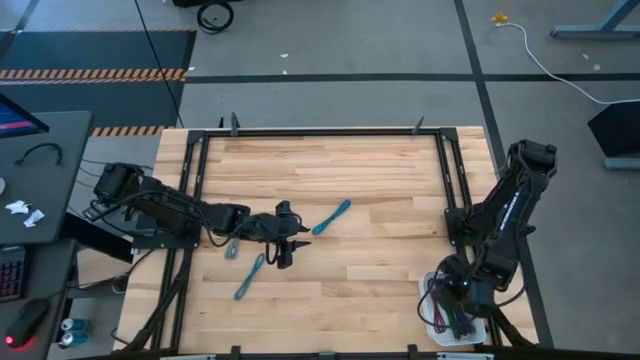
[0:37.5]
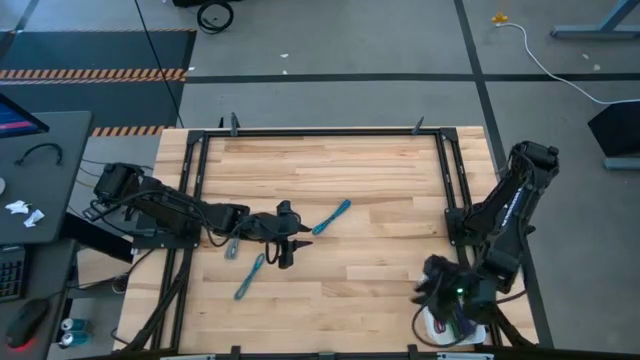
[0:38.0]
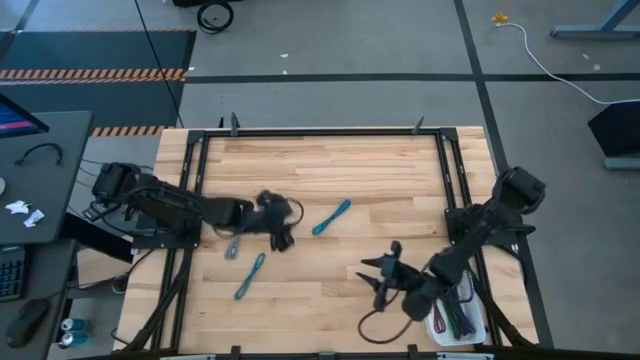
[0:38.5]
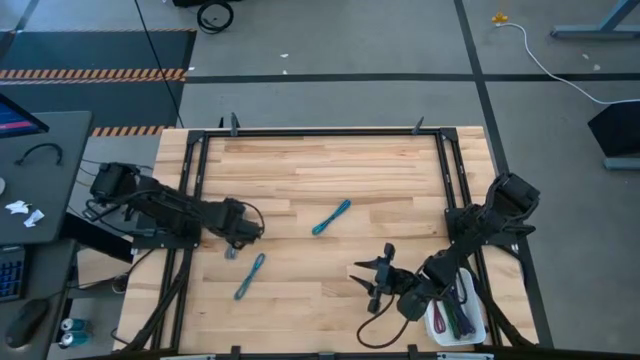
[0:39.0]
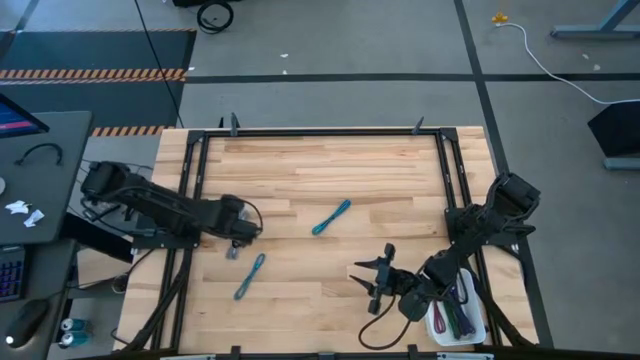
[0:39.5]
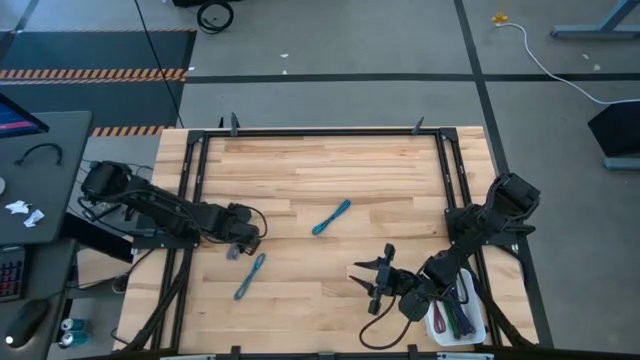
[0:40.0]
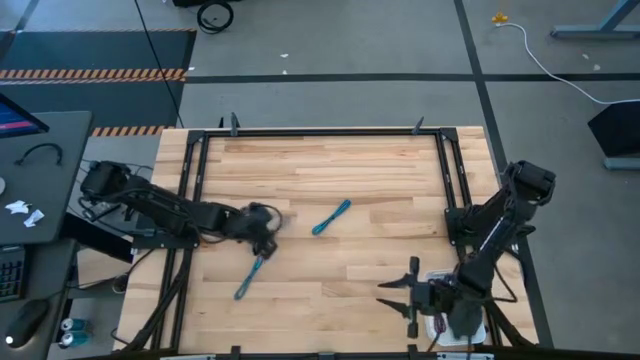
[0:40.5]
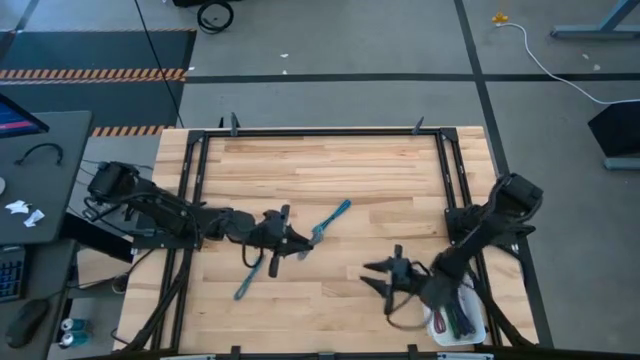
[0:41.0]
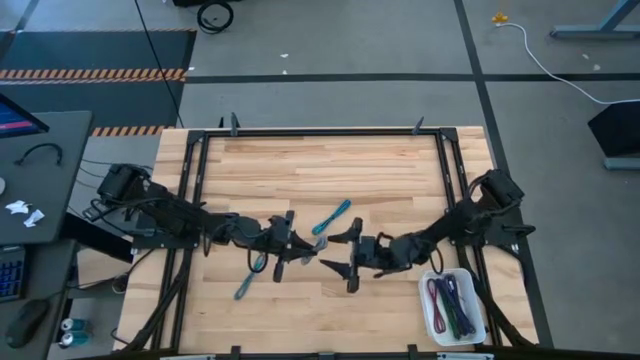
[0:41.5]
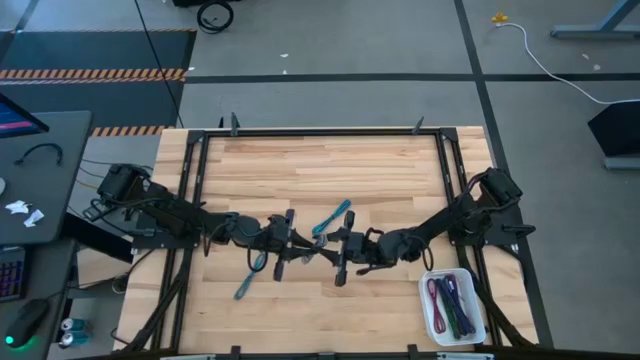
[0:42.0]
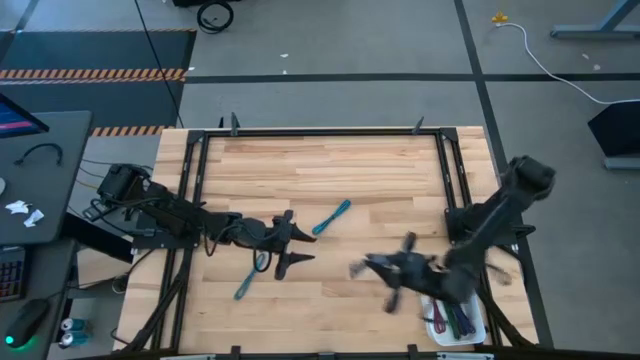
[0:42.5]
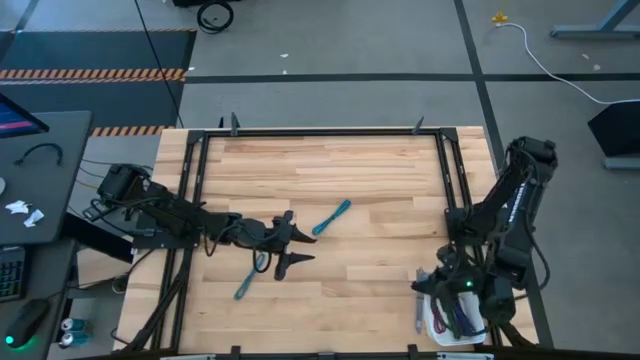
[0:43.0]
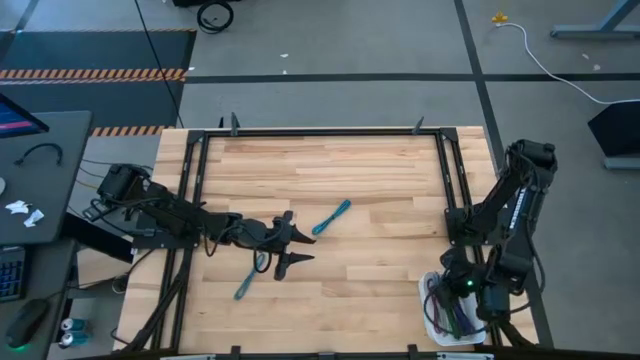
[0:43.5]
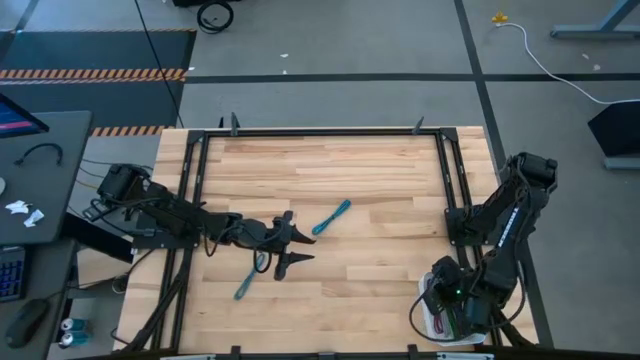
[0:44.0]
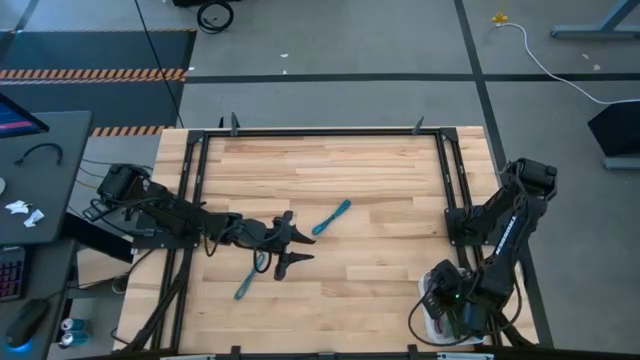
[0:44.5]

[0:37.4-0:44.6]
Task: Pick and place USB-C Cables
Put the white charger cable into the white bin

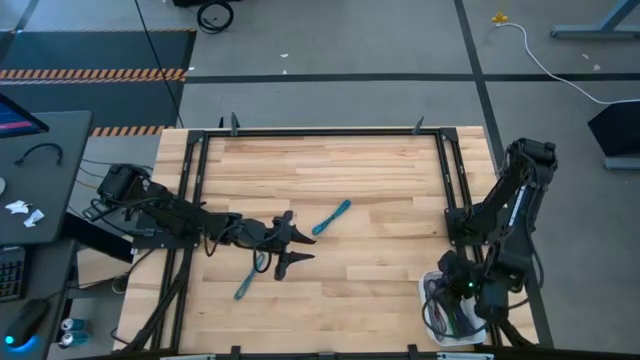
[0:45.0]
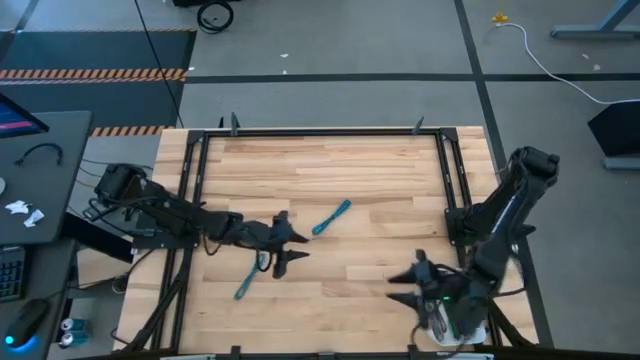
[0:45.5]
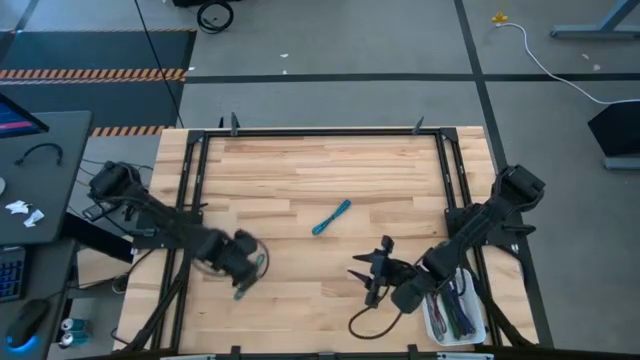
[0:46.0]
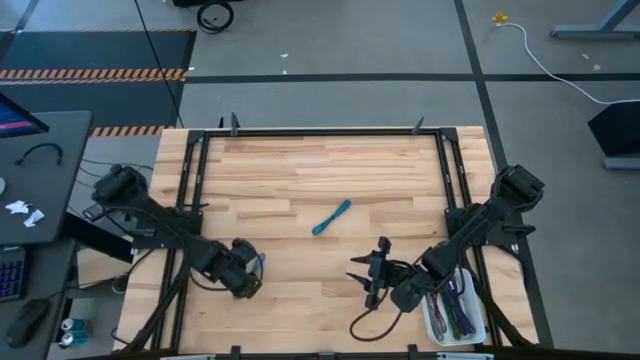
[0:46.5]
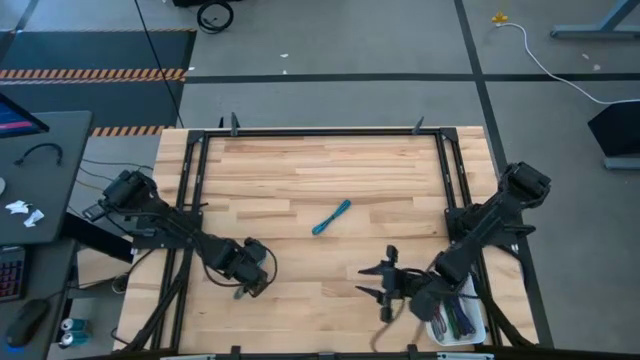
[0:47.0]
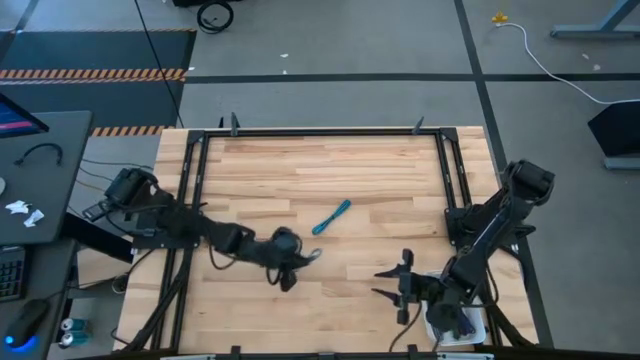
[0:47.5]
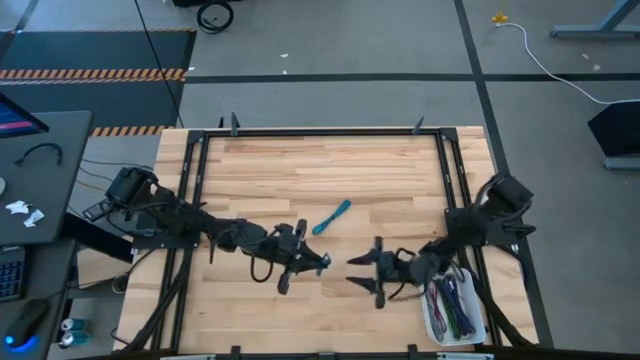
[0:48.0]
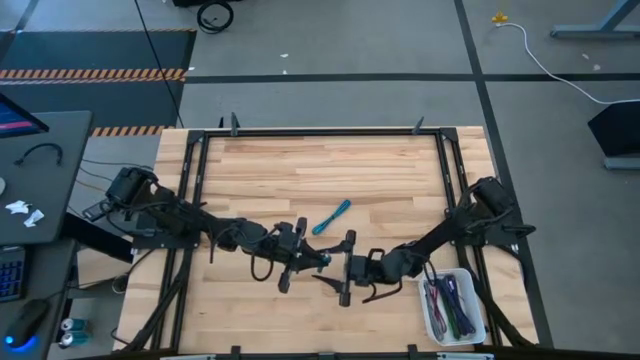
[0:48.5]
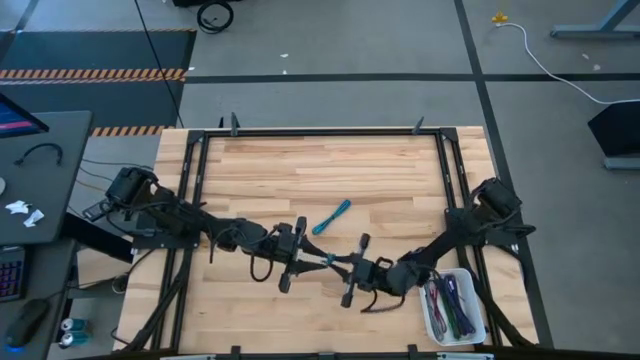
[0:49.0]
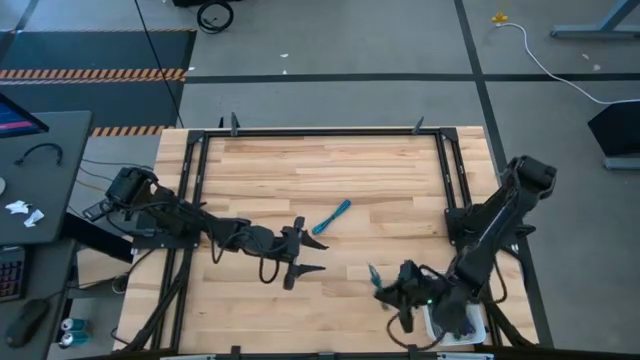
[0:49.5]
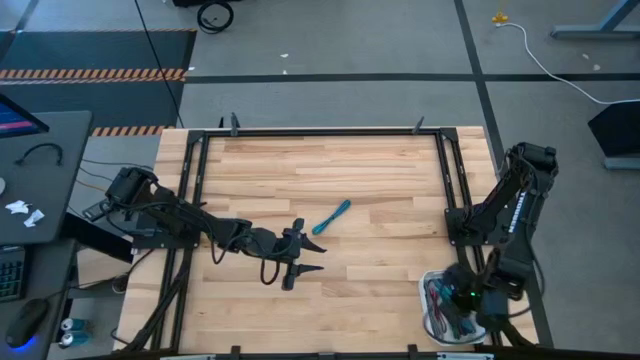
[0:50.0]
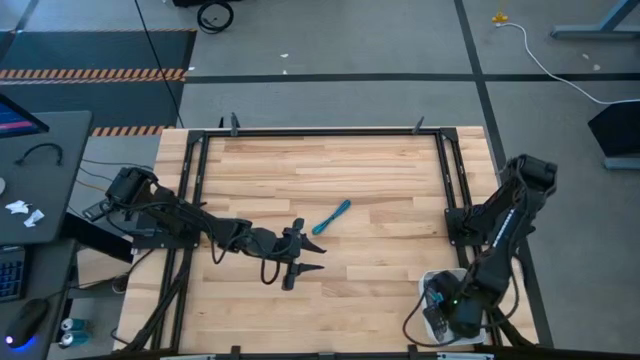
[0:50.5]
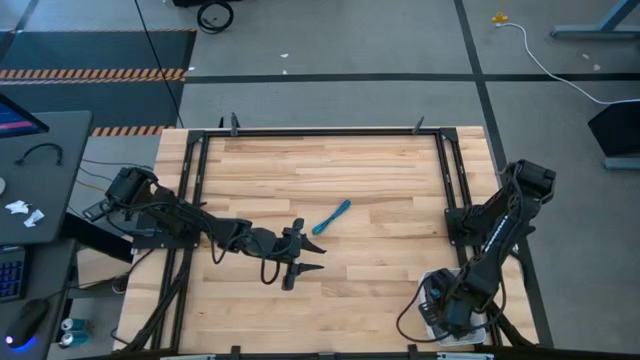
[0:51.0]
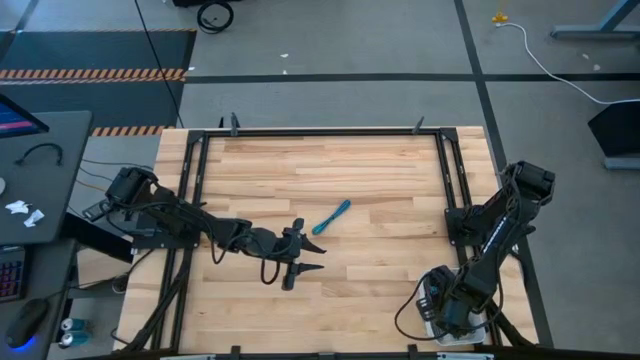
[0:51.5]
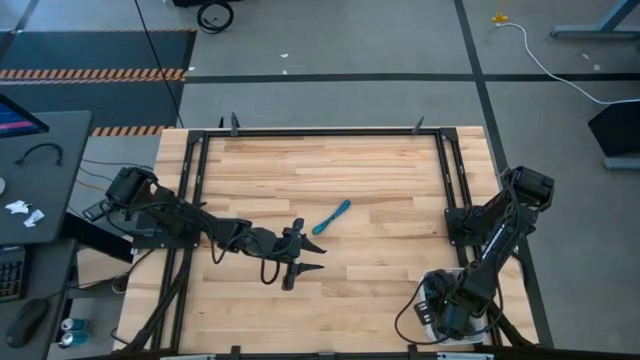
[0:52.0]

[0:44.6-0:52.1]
Put the bottom blue charger cable into the white bin

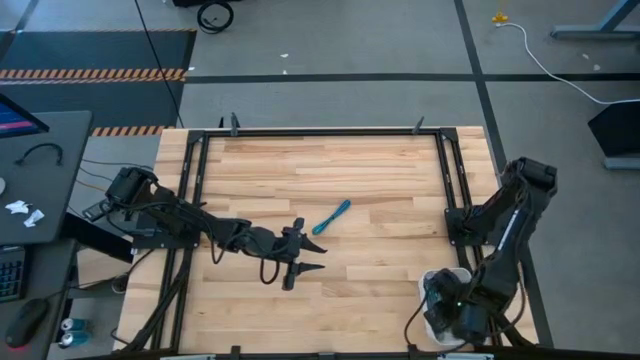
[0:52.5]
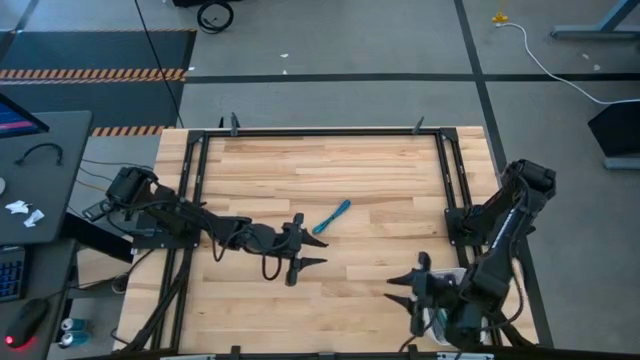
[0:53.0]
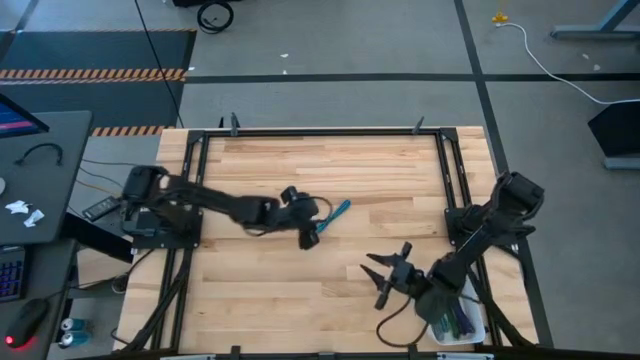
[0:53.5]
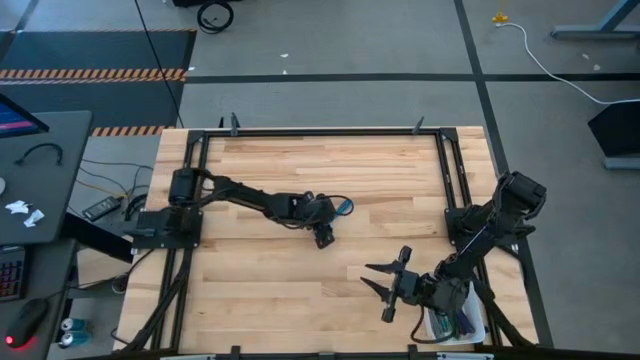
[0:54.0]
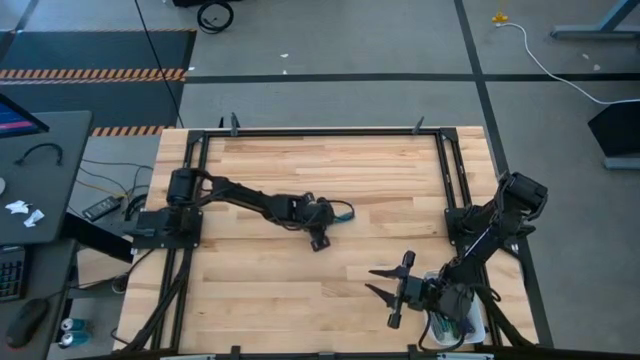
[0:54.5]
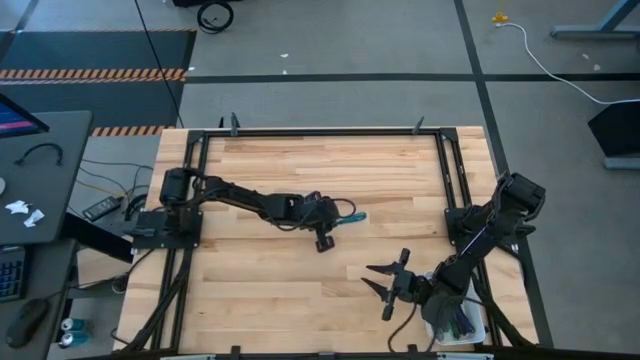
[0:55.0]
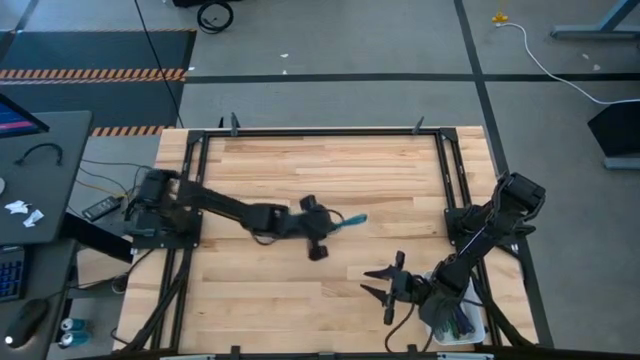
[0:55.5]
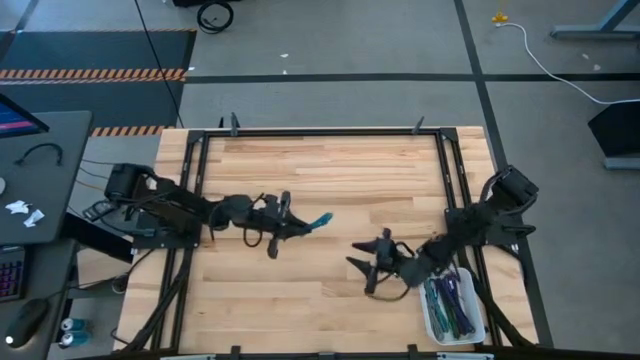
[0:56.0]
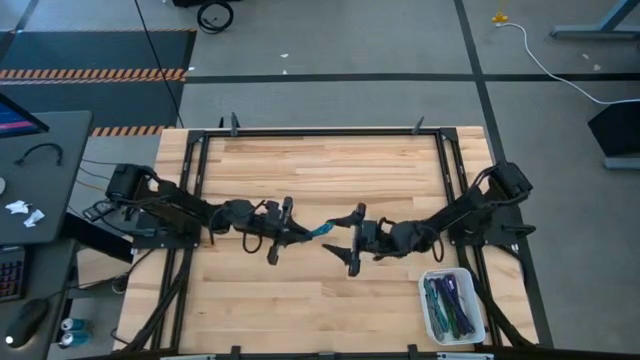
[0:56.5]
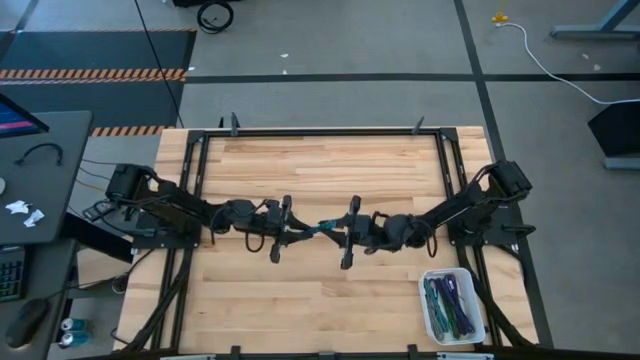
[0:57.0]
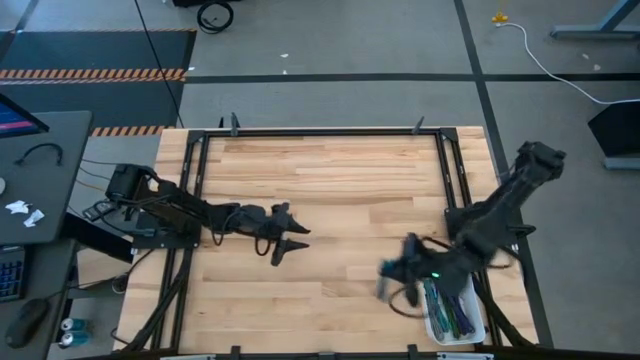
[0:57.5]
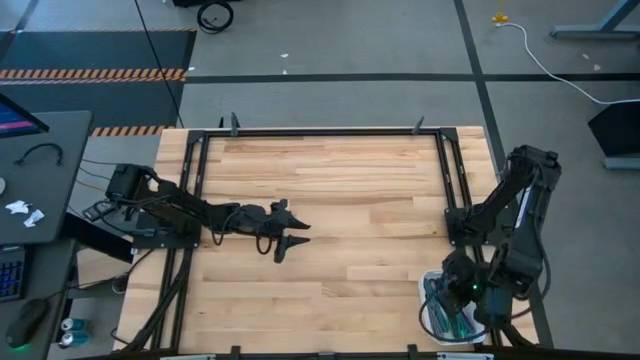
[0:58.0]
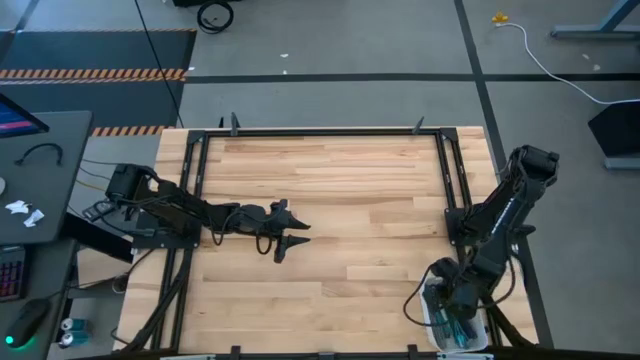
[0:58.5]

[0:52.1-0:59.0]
Put the blue charger cable into the white bin
